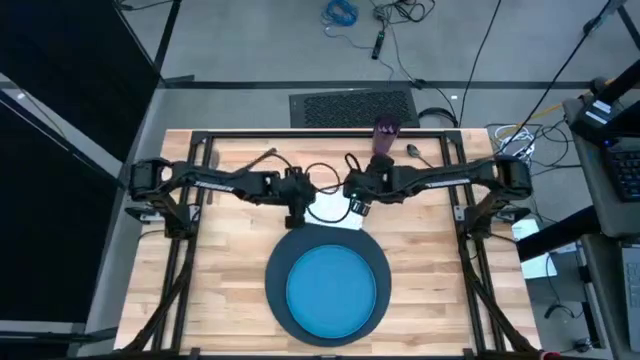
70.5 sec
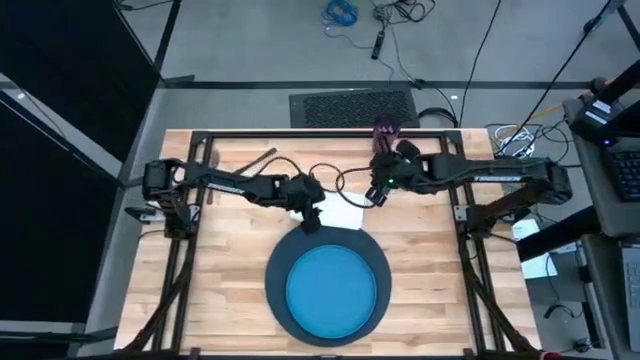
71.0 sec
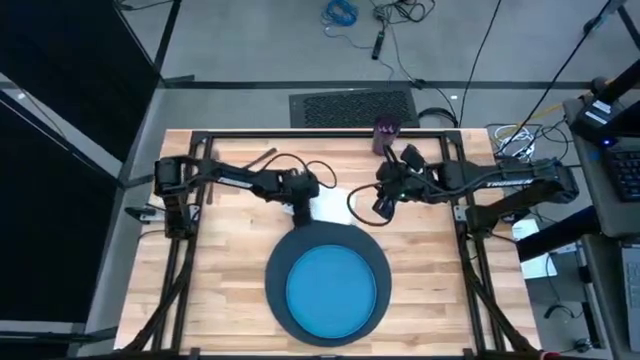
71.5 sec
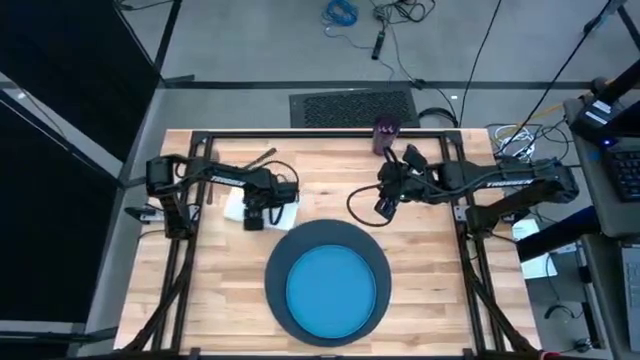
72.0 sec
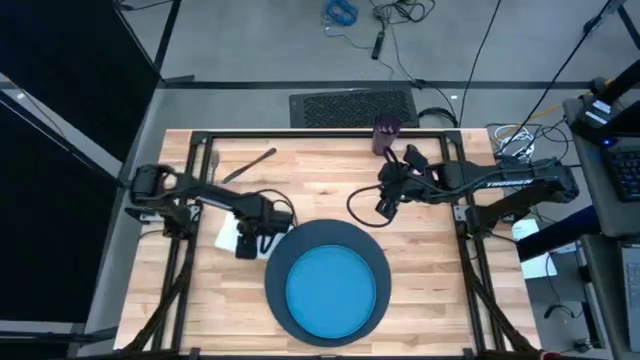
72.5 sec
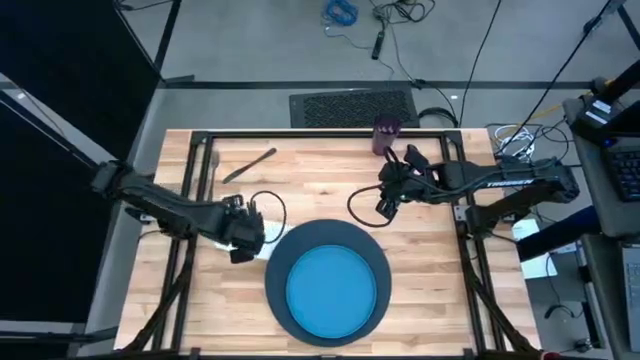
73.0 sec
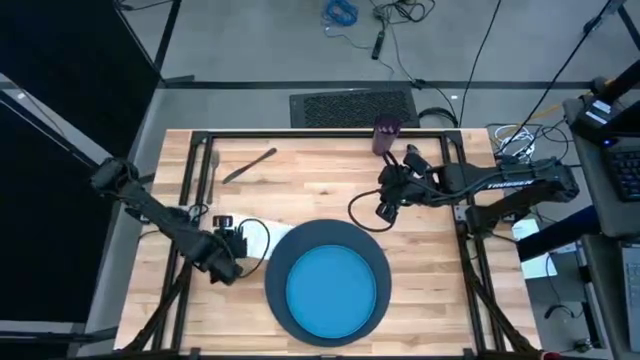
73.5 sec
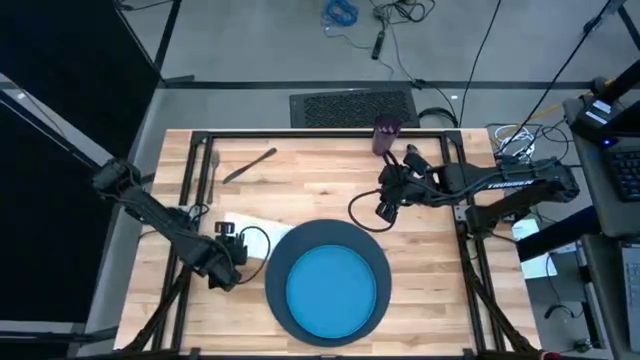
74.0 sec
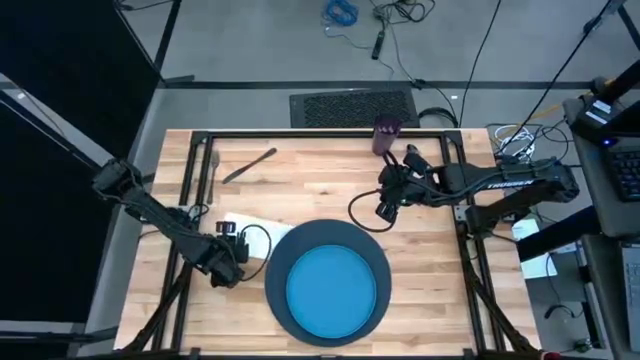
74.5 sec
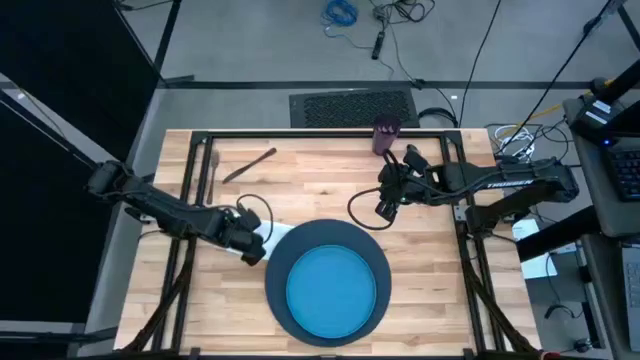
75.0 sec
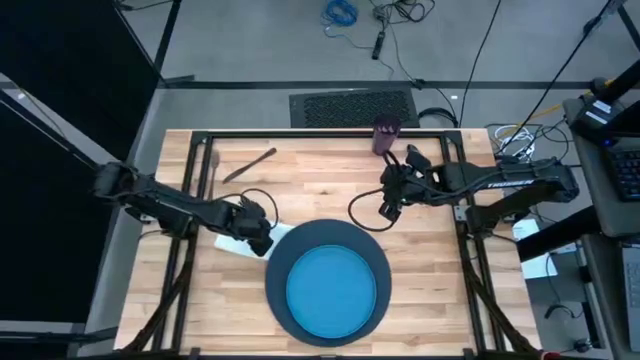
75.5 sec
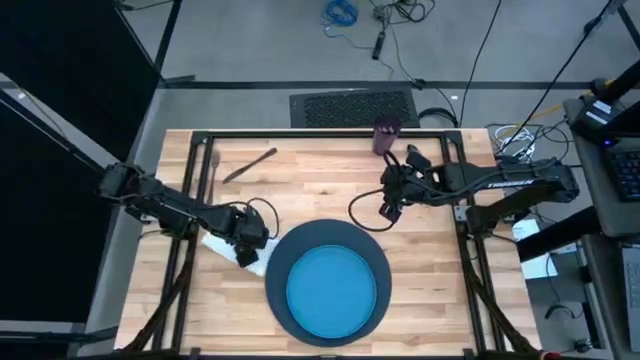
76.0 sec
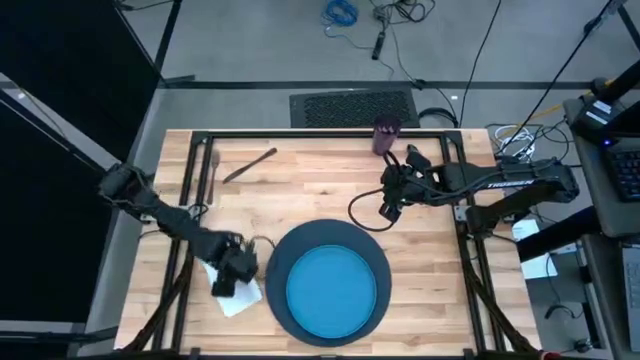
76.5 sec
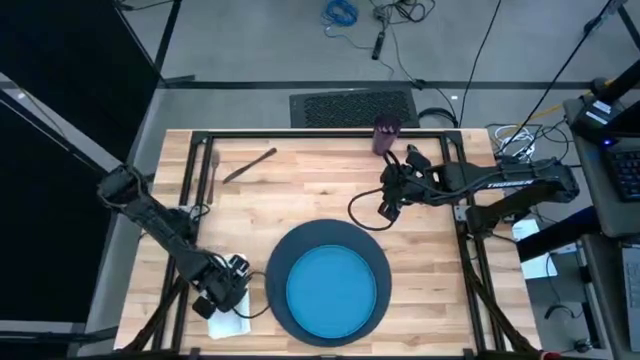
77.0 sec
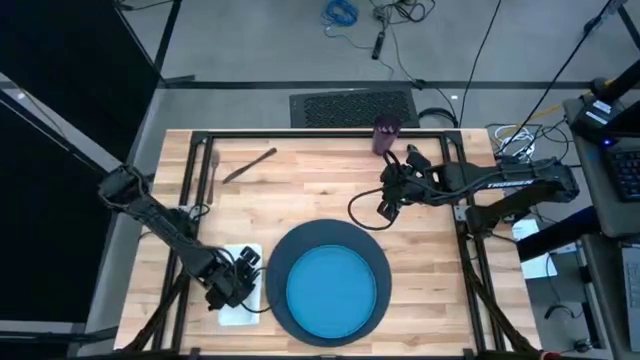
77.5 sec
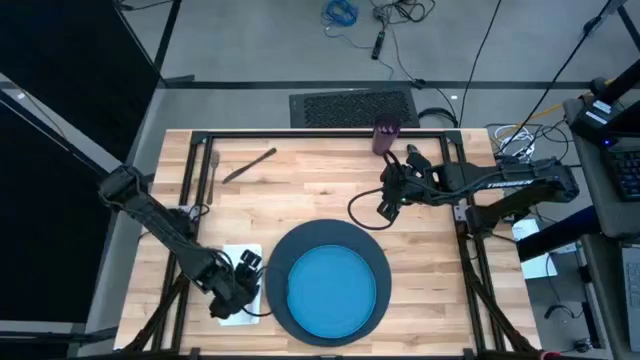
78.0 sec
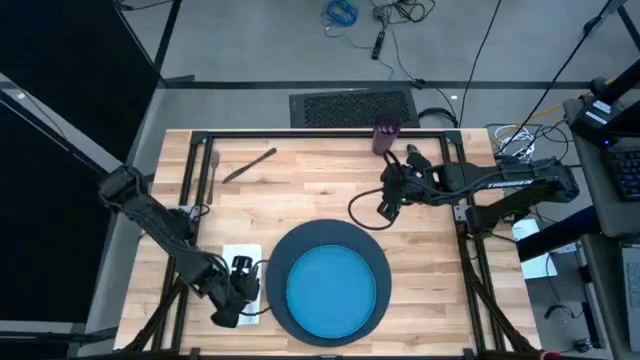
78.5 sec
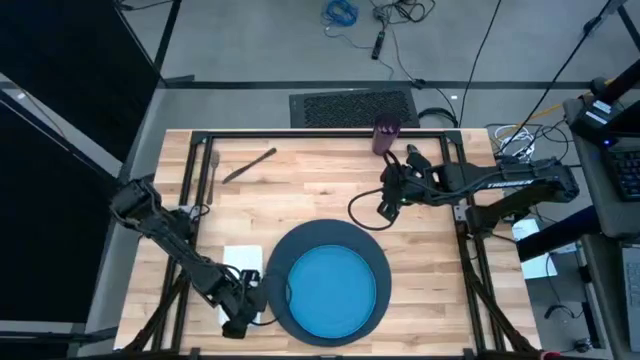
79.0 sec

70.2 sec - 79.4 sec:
Task: Set table place
Move the white table napkin to the left of the blue table mat on the table

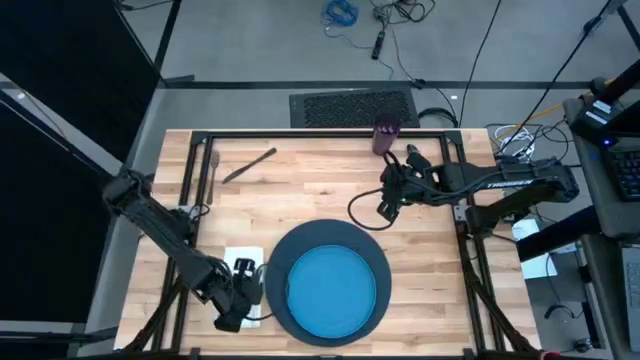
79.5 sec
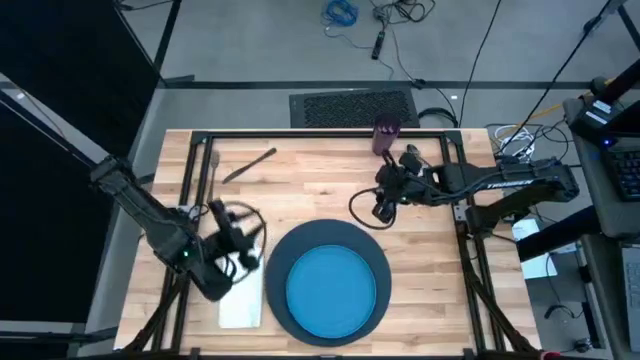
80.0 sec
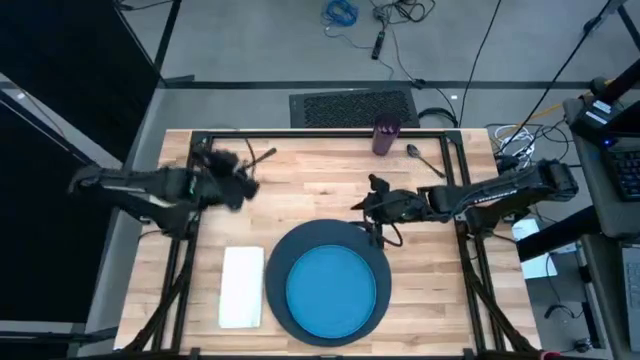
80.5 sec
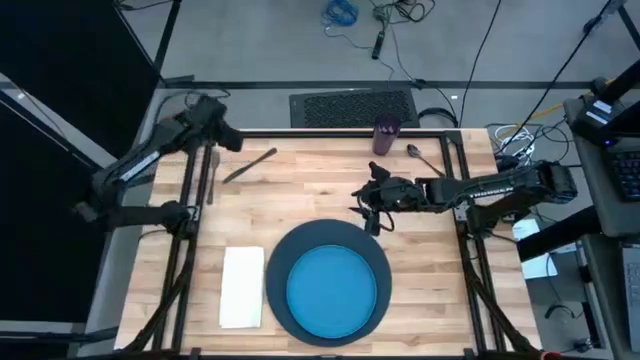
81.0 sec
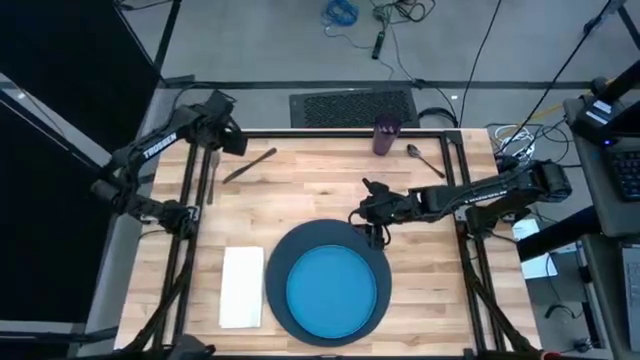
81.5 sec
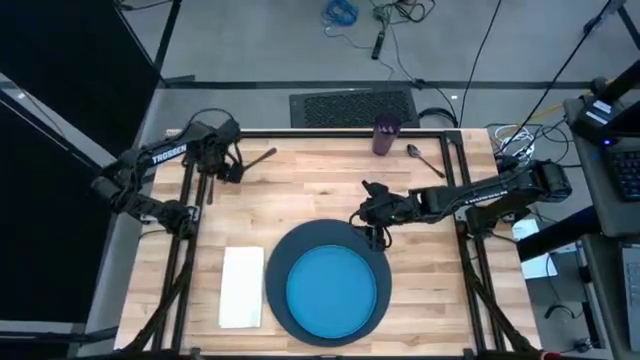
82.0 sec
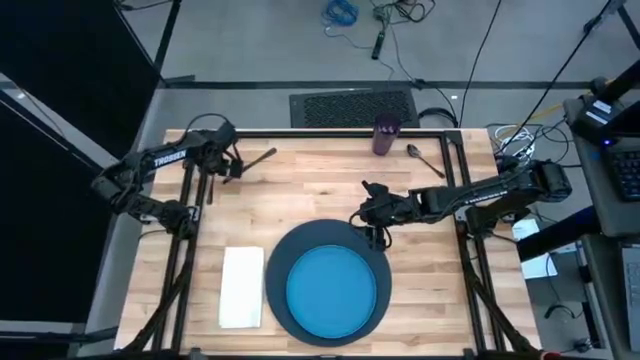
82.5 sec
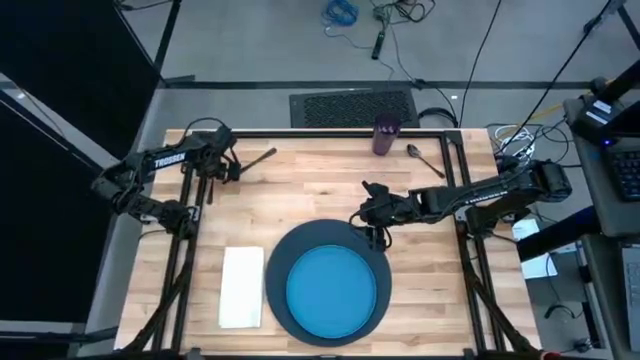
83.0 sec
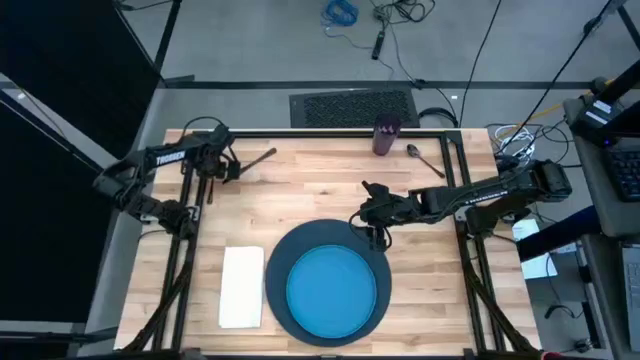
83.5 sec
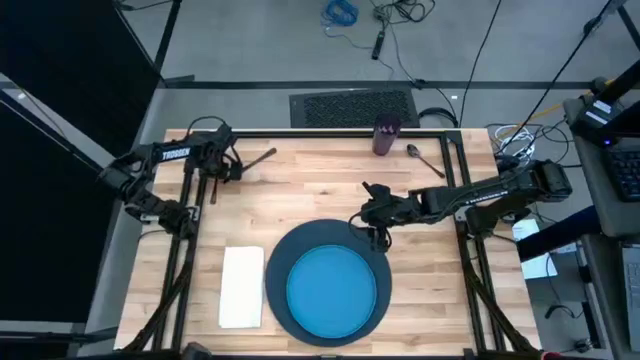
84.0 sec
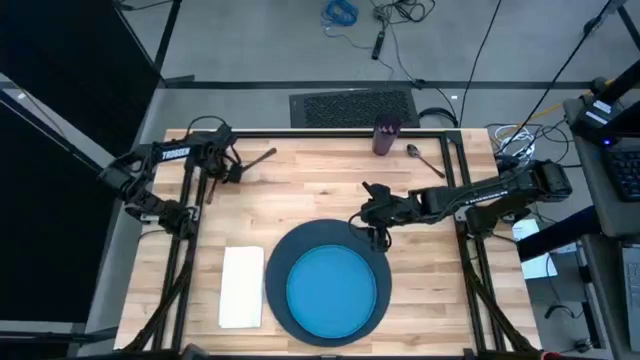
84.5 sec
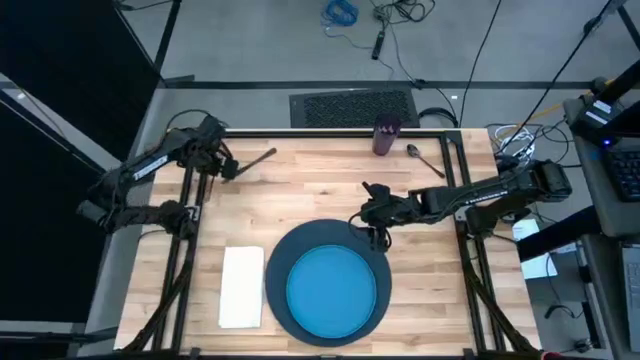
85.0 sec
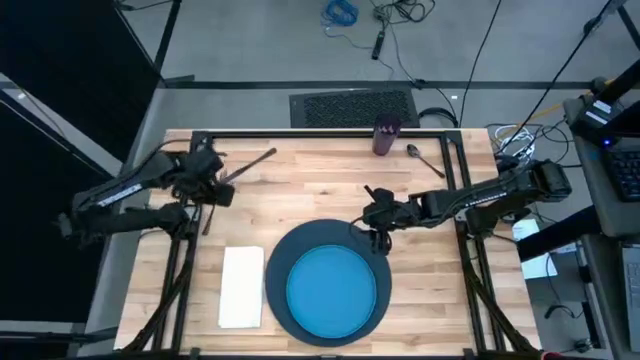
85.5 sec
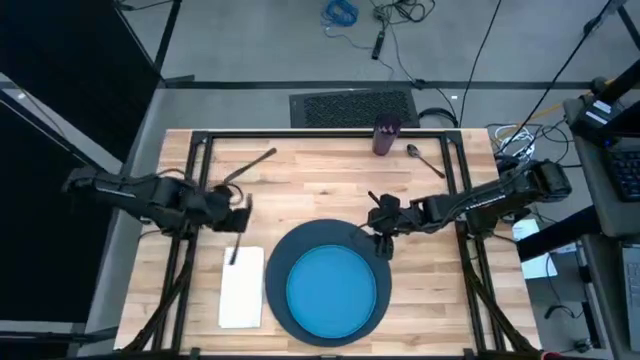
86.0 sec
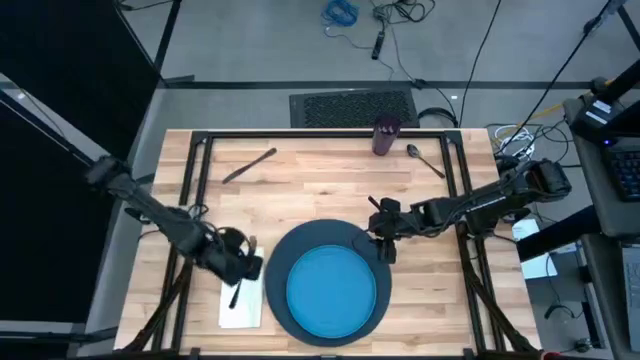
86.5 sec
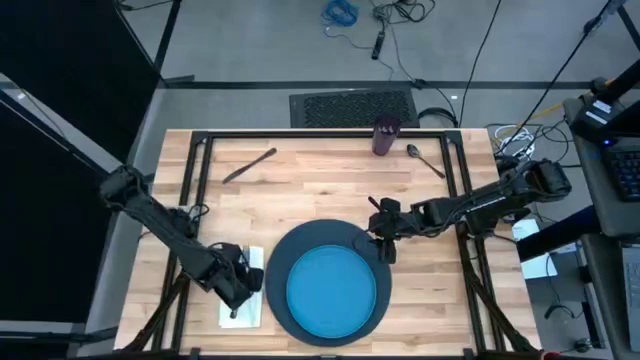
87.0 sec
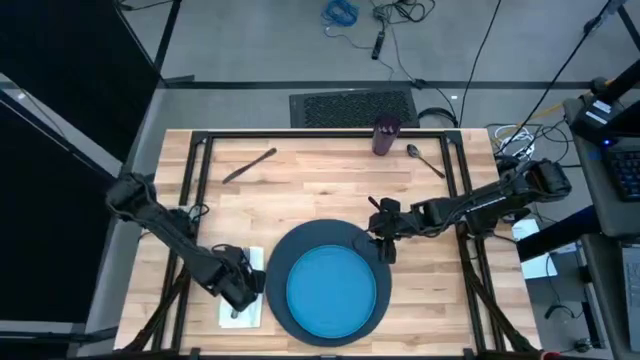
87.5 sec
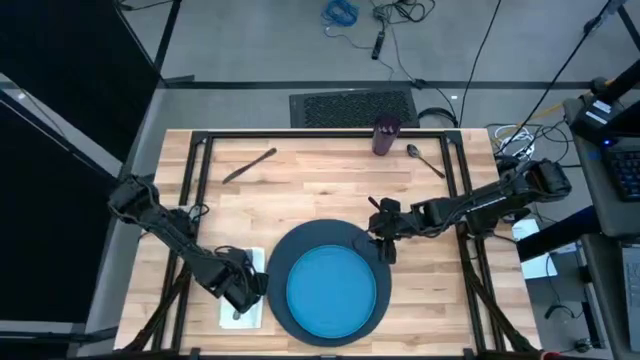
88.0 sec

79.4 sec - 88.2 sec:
Put the black fork on top of the white table napkin
